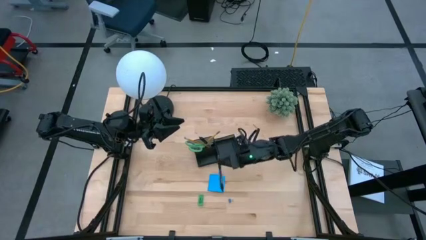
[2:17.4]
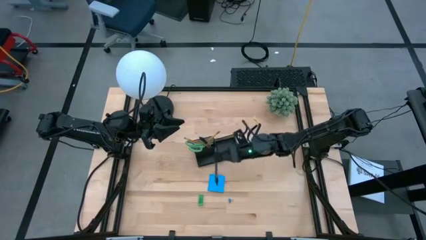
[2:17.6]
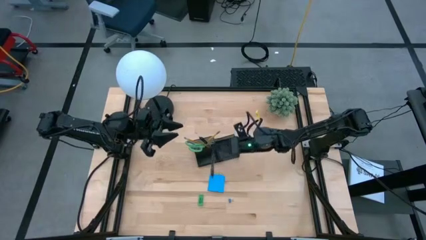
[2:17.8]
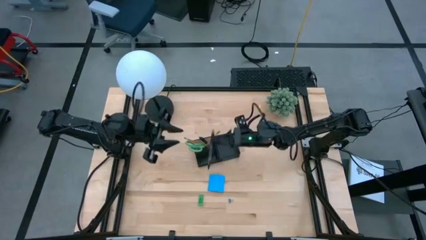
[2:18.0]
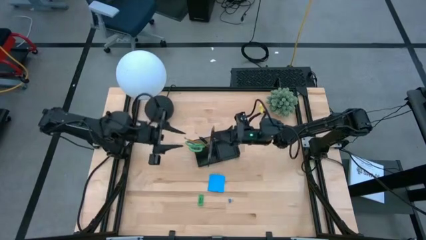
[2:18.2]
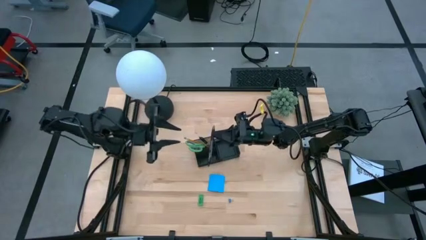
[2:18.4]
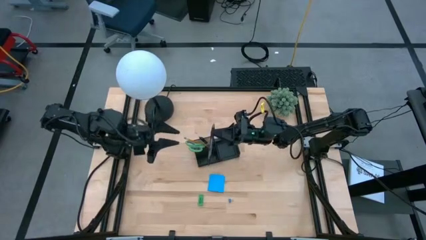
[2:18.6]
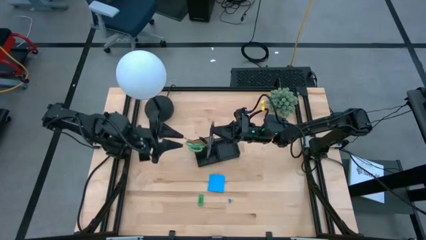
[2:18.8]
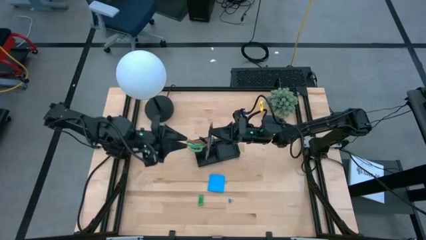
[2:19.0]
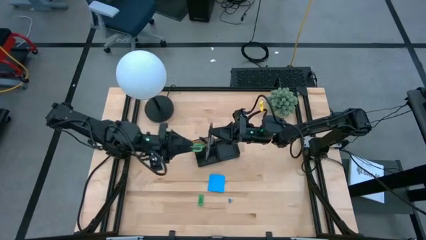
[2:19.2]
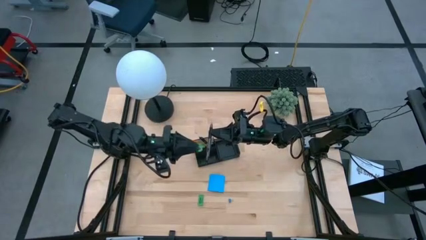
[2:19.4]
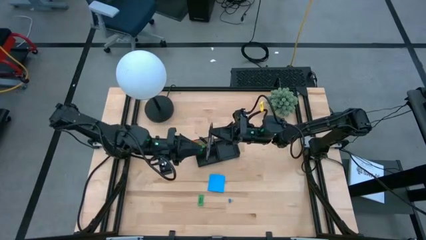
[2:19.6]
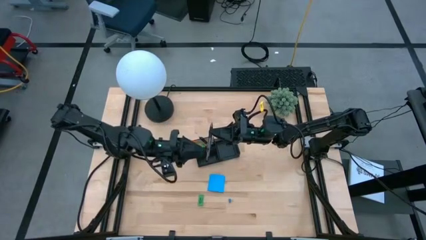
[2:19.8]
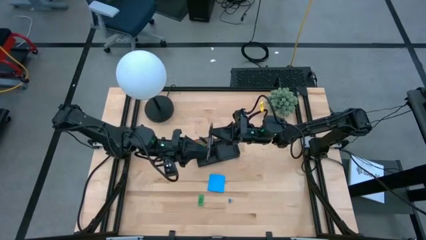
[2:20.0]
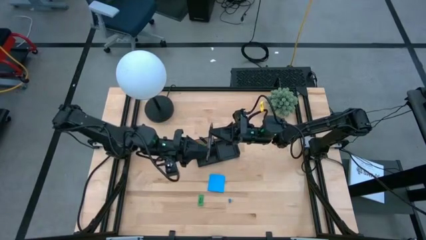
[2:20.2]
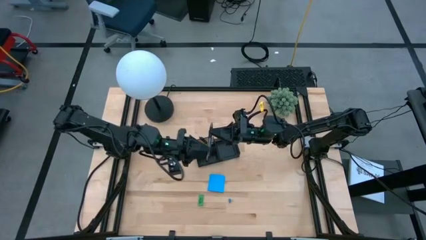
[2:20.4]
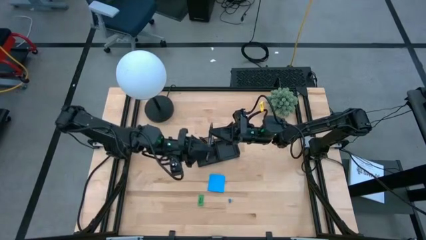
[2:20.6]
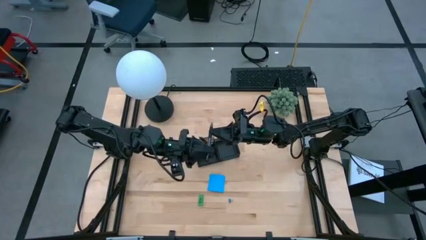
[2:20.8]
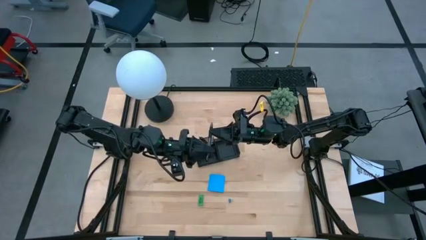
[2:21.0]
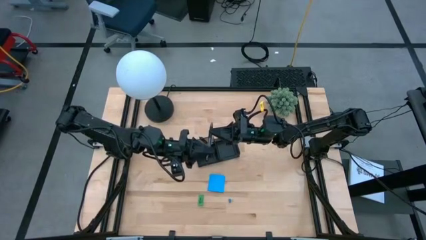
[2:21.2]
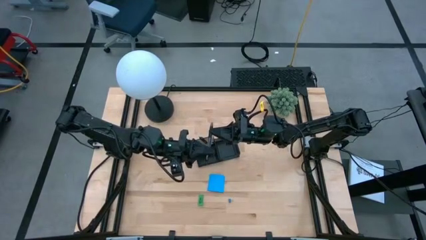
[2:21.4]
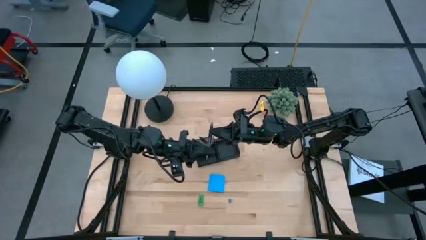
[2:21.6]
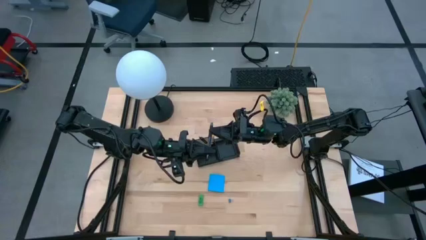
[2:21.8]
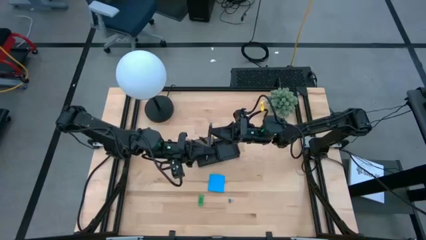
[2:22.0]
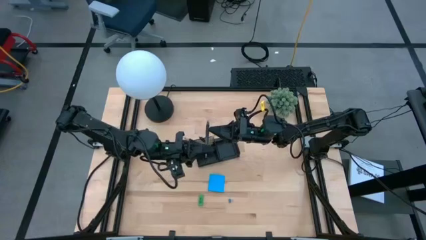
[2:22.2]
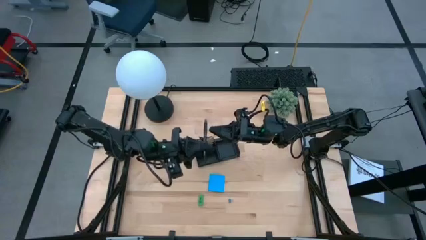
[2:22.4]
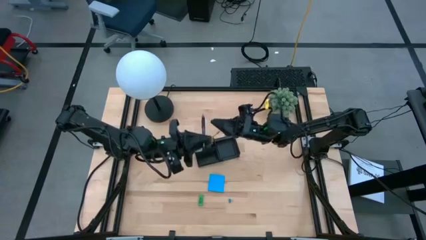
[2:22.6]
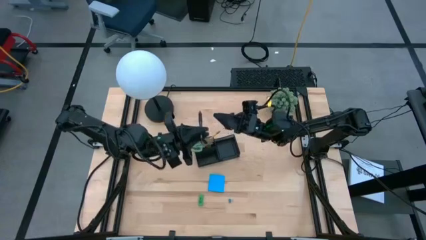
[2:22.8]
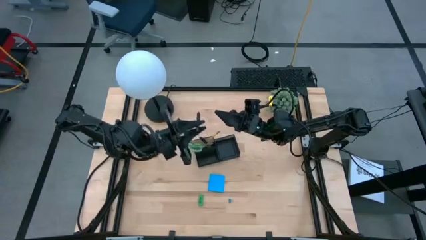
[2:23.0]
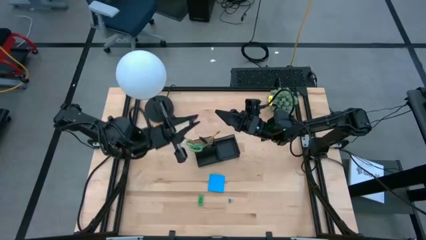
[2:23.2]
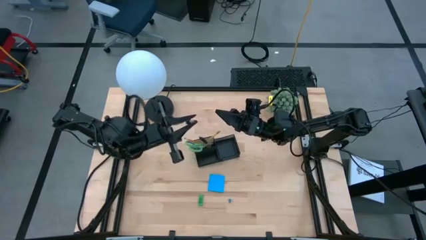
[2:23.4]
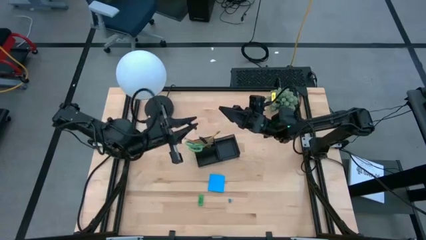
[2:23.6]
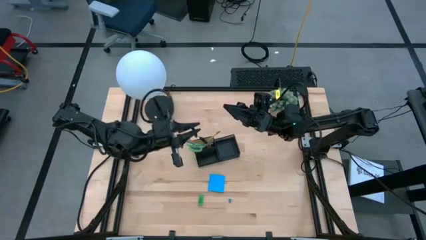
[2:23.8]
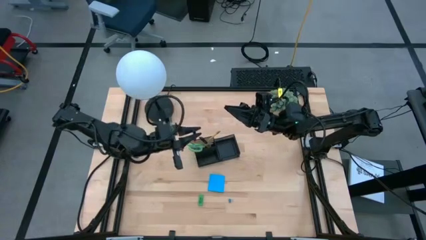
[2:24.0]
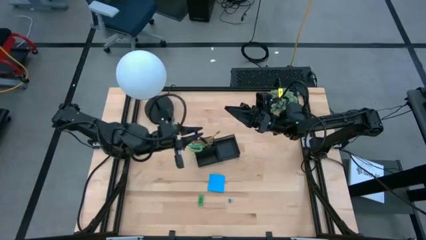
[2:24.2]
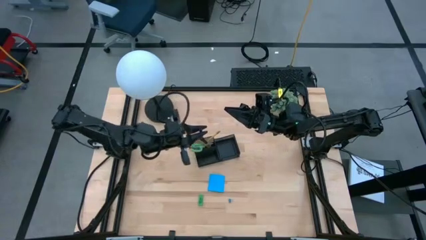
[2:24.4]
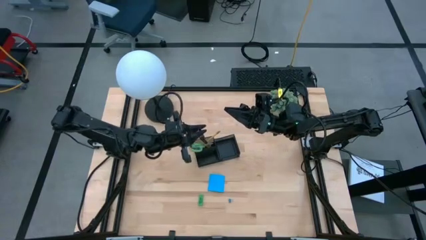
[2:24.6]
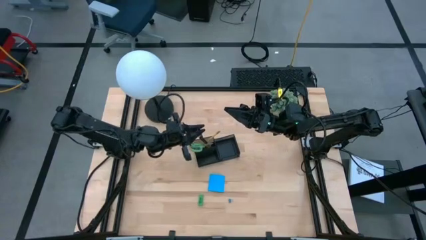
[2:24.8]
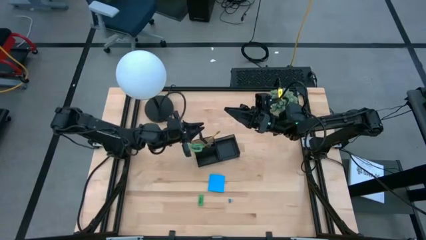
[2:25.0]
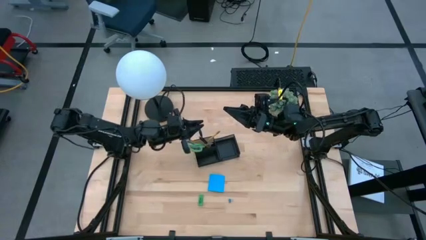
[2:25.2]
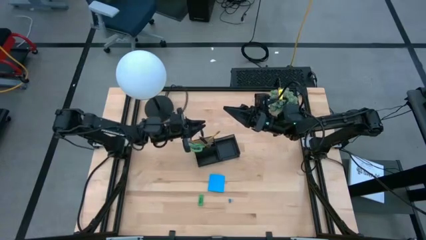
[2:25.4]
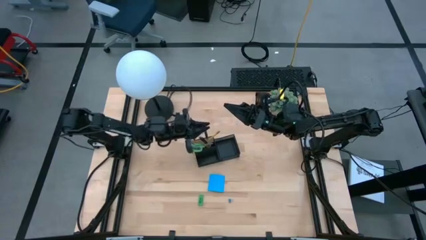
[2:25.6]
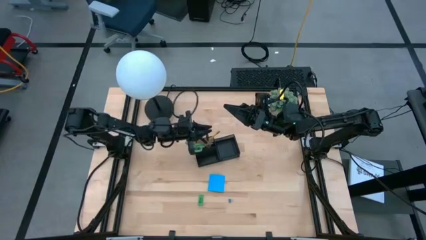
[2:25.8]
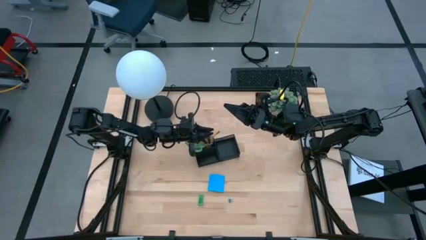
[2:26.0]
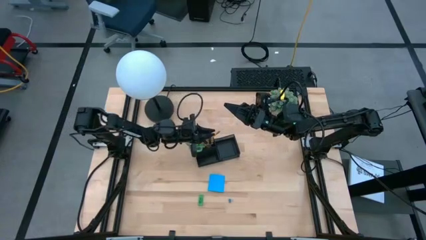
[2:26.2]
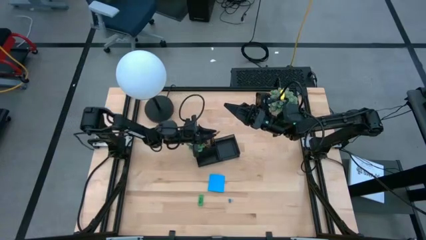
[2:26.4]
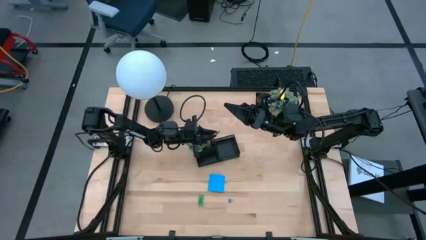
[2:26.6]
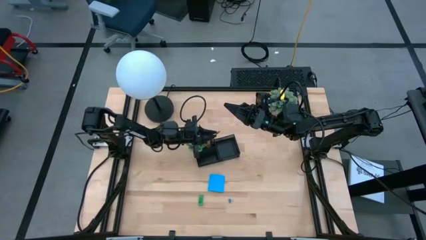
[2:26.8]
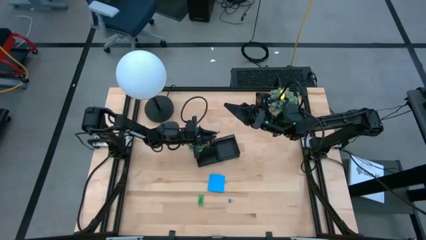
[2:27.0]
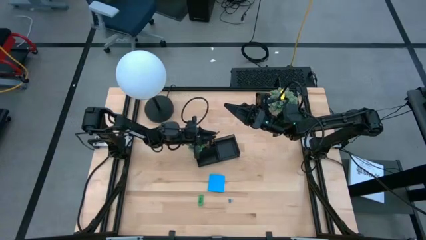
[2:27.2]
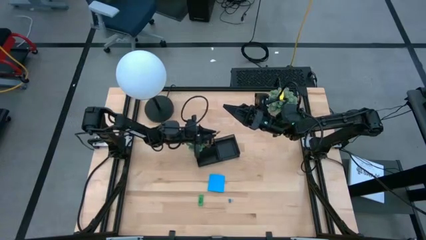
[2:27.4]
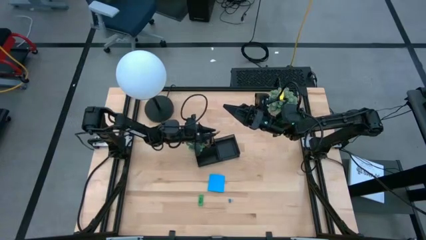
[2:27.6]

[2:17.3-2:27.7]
Task: Pick and place office supplies into organizer
Put the black pen into the black desk organizer
